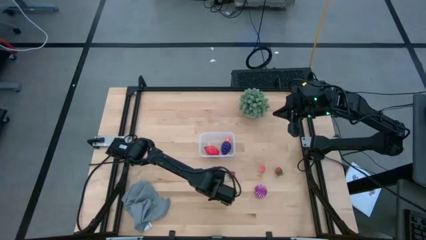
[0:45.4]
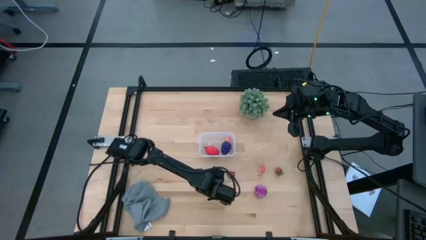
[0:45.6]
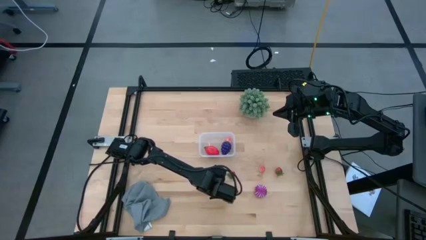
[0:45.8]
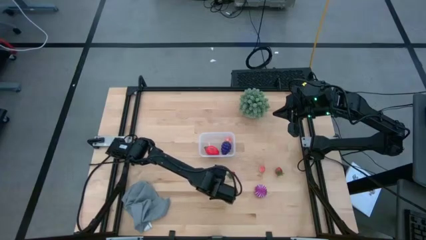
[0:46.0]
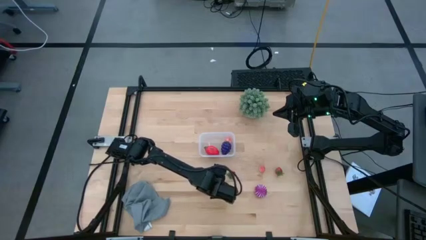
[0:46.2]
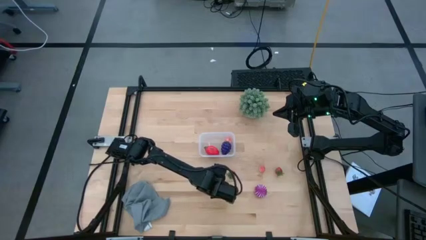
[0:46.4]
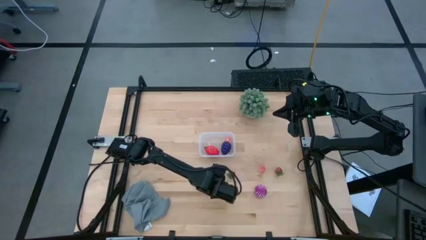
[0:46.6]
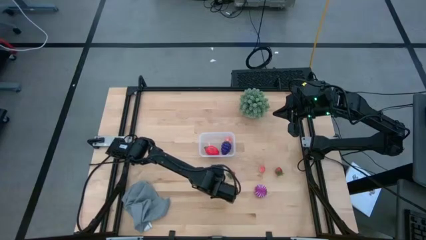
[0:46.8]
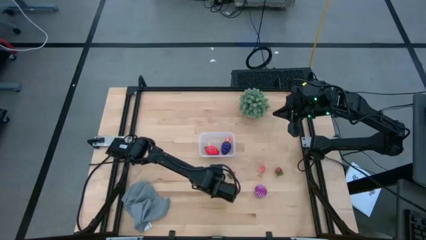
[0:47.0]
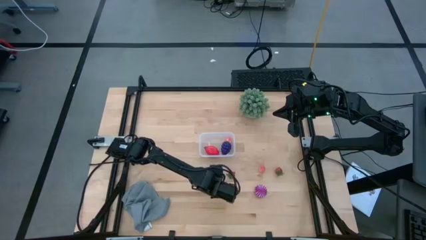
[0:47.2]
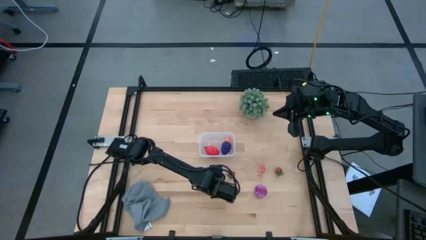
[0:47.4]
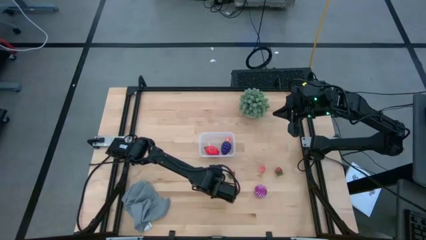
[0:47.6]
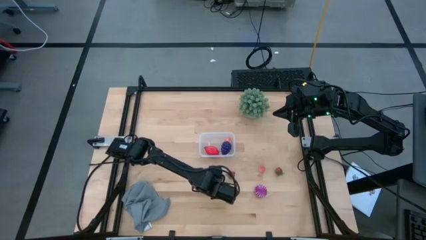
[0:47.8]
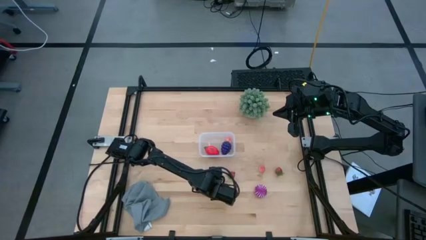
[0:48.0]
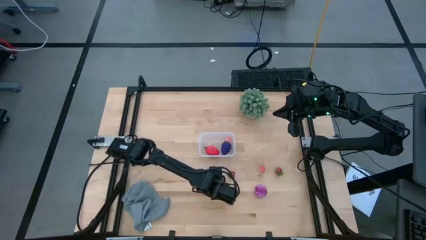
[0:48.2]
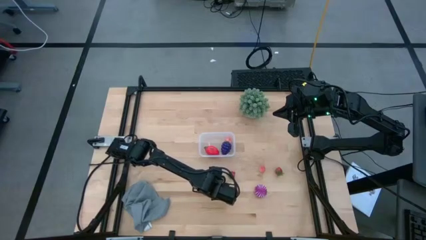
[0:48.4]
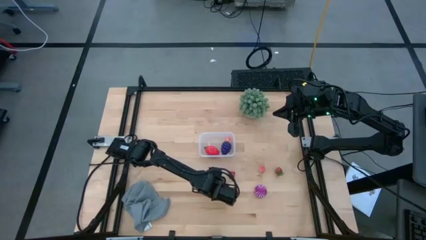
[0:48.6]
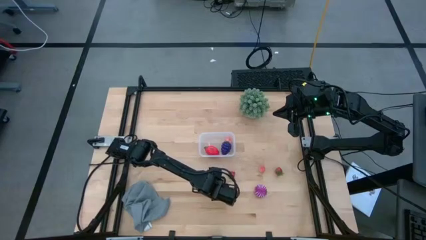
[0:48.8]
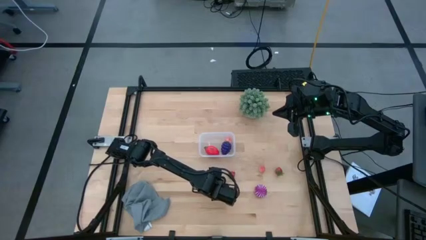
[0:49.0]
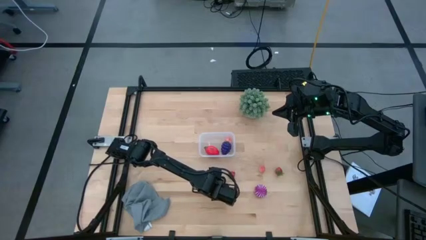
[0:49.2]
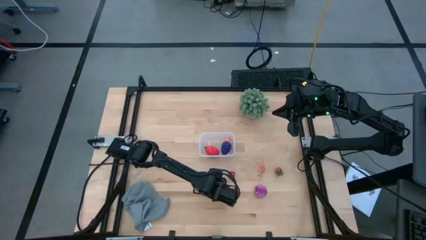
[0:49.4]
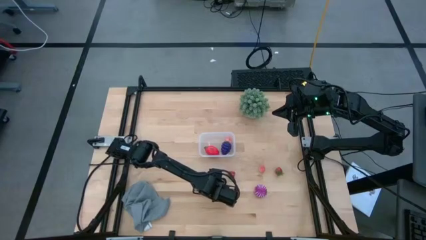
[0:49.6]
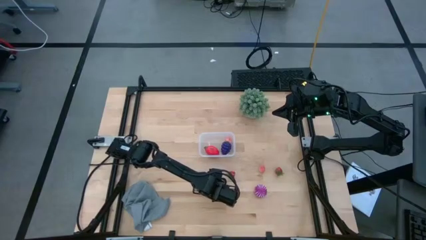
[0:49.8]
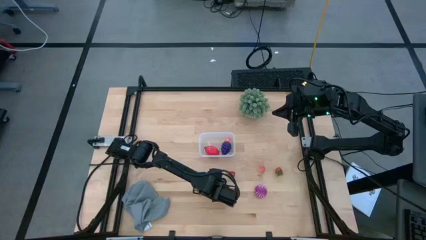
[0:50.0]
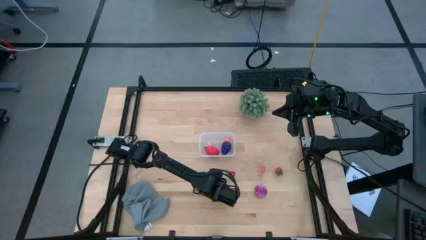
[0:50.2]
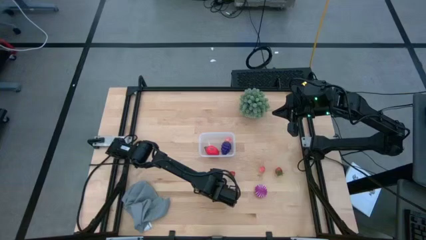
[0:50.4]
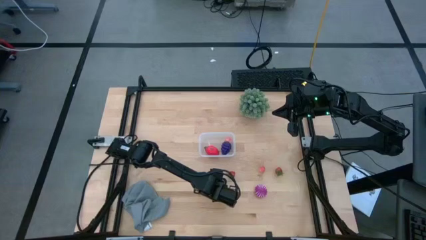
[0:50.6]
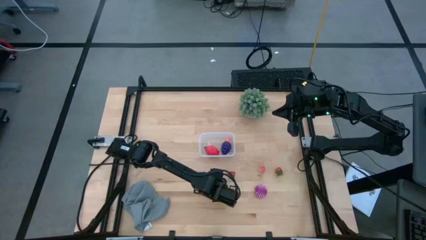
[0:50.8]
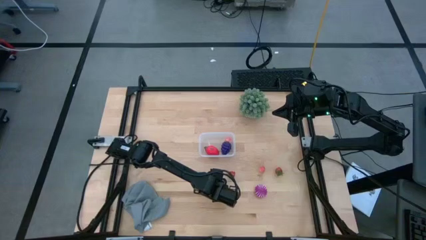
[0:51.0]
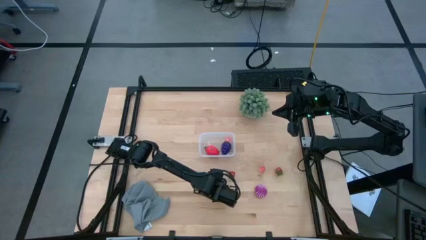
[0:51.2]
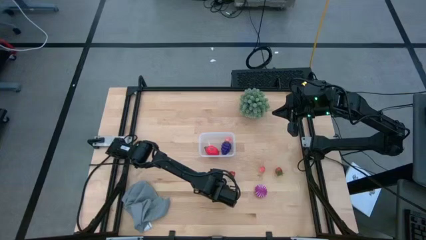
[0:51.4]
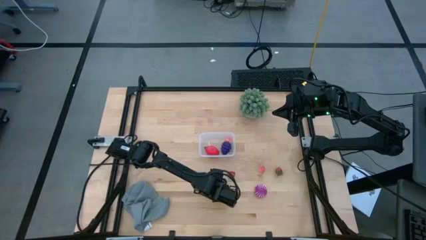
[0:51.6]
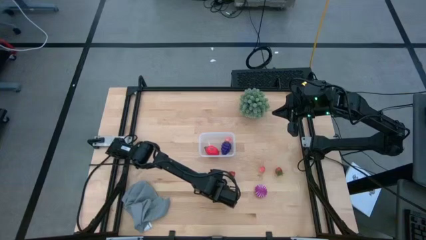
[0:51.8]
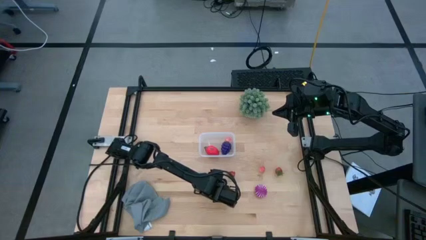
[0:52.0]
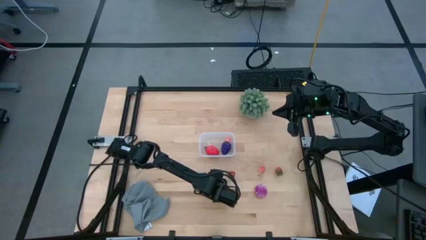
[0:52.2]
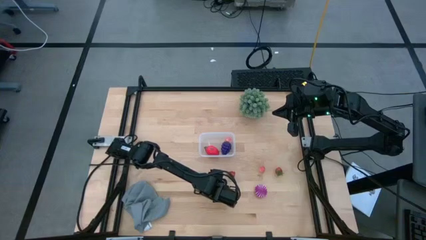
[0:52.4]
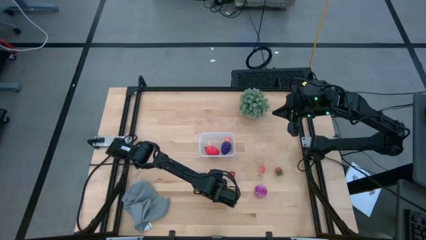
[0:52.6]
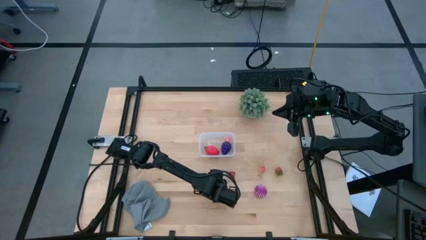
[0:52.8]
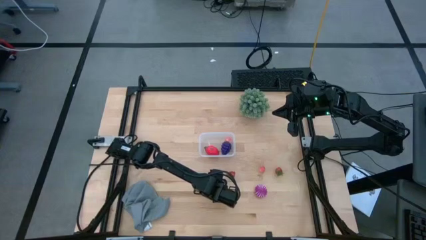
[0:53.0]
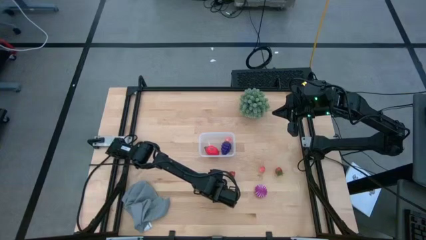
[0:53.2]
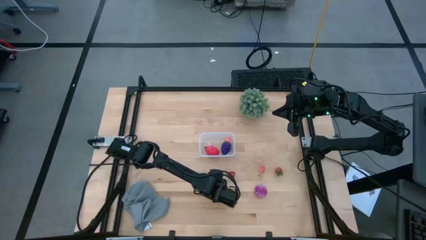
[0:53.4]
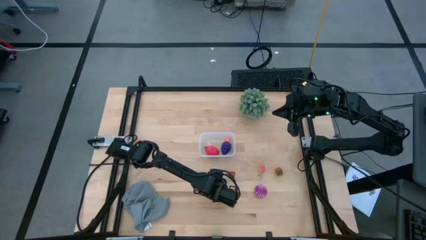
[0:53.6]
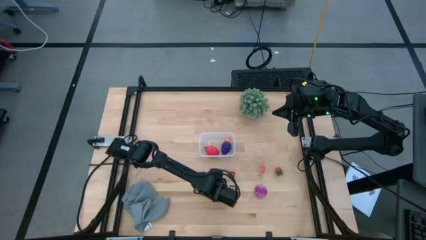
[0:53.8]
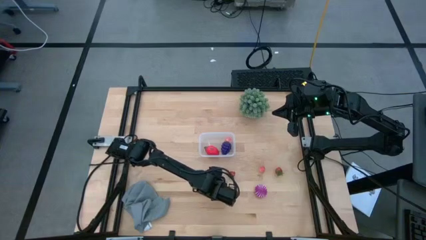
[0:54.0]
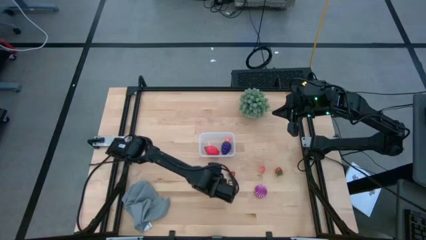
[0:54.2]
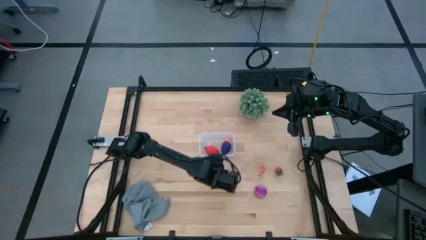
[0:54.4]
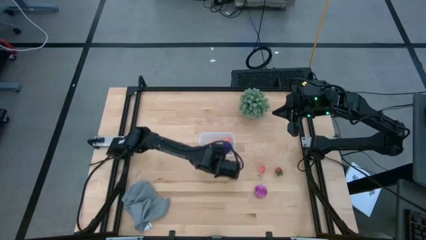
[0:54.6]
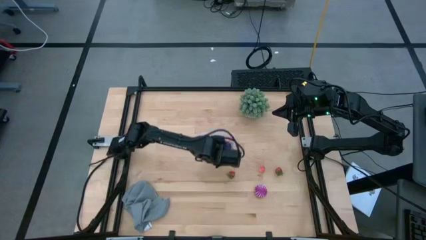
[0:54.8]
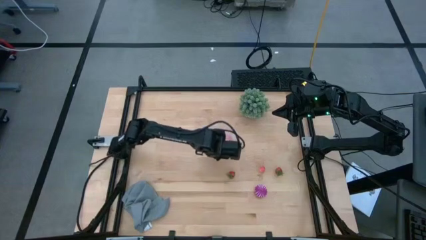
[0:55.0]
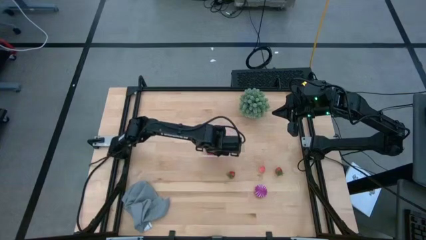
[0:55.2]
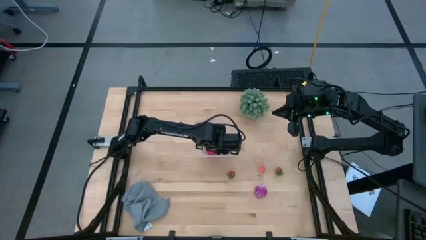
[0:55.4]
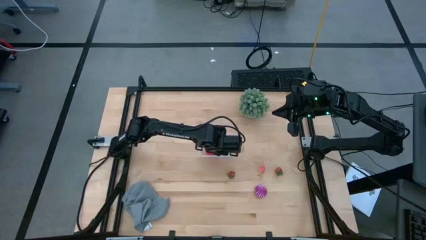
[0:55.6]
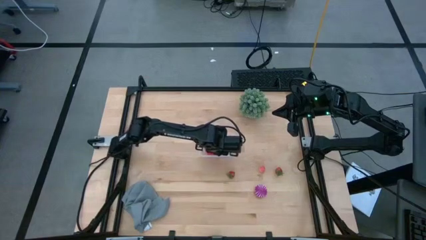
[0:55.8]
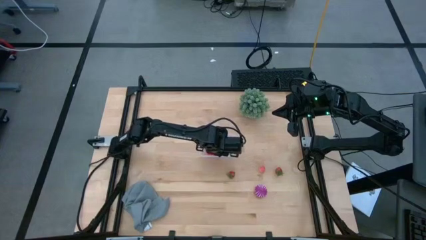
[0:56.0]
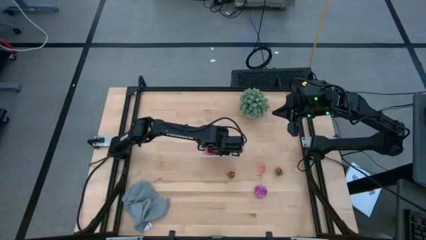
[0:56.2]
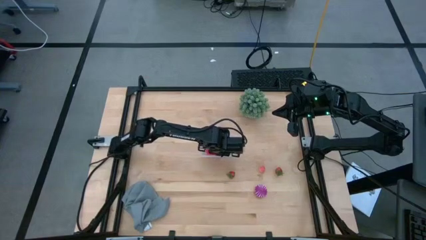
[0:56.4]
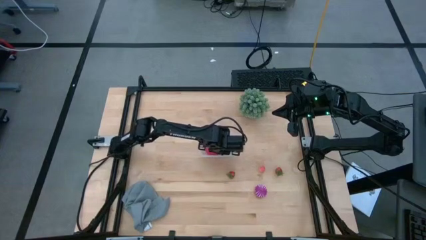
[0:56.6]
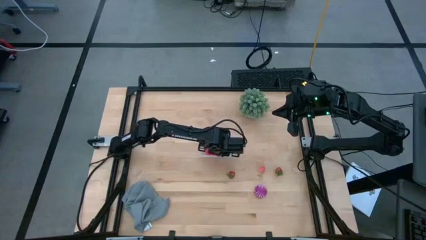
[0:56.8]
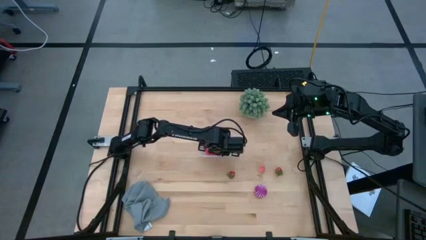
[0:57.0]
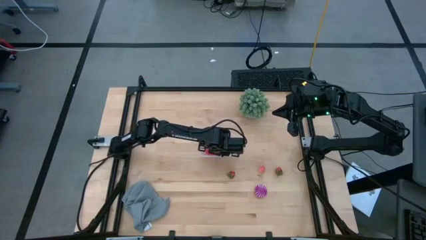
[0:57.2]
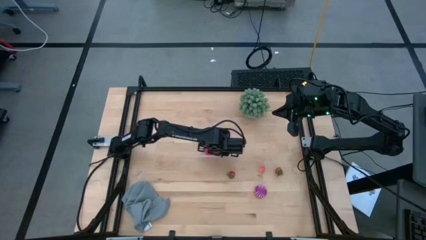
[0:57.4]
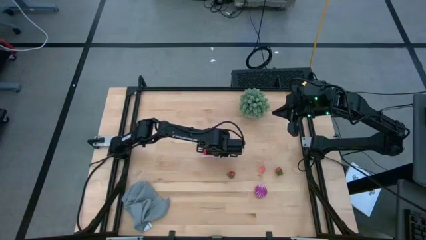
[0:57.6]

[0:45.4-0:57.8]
Task: Pick and placing Produce into tupperware
Put the left red strawberry into the transparent bin

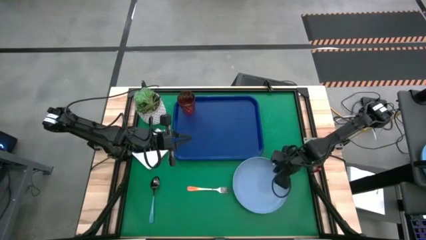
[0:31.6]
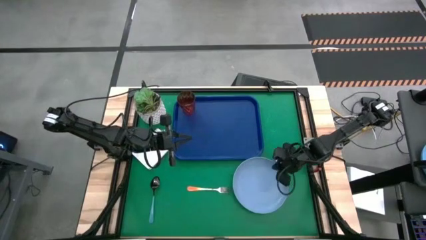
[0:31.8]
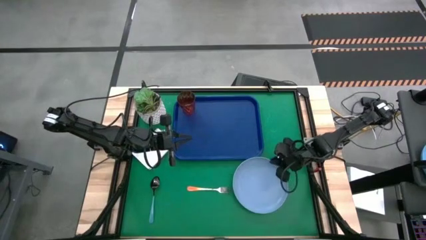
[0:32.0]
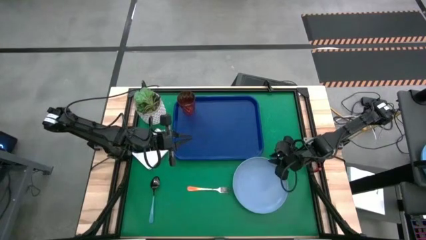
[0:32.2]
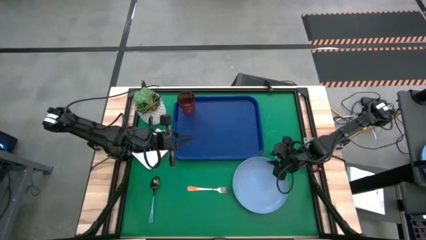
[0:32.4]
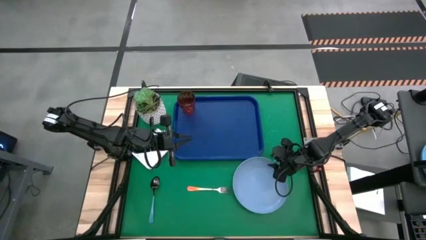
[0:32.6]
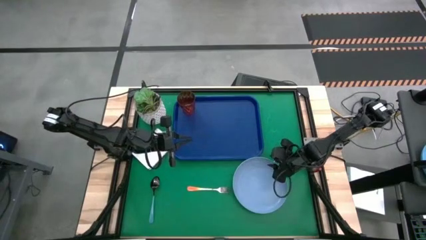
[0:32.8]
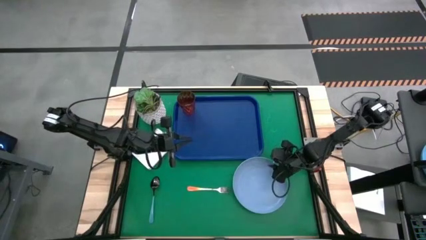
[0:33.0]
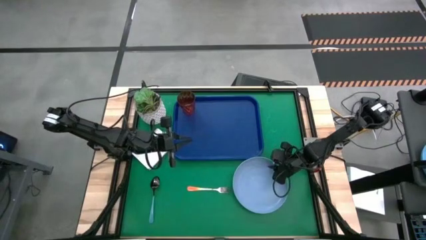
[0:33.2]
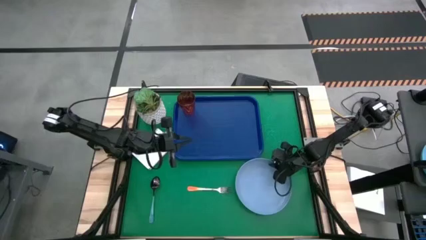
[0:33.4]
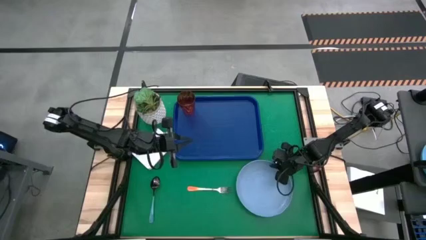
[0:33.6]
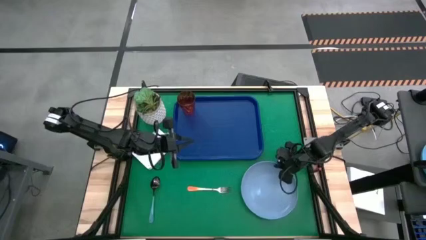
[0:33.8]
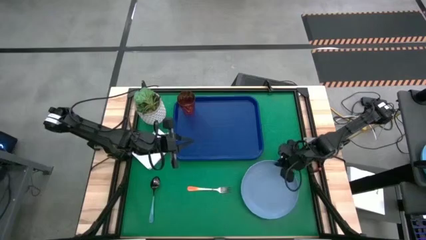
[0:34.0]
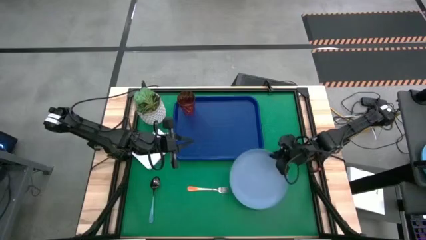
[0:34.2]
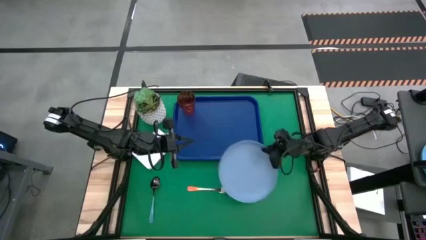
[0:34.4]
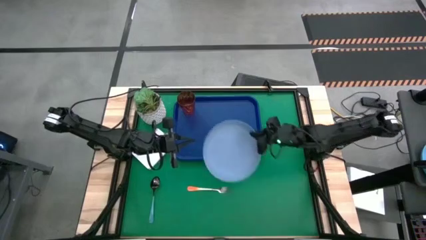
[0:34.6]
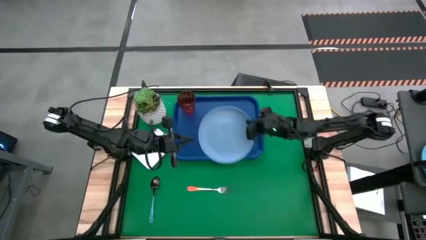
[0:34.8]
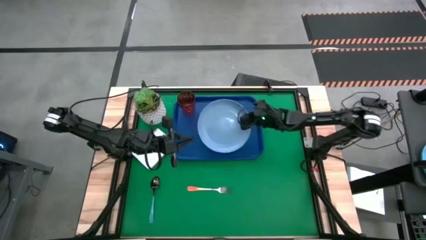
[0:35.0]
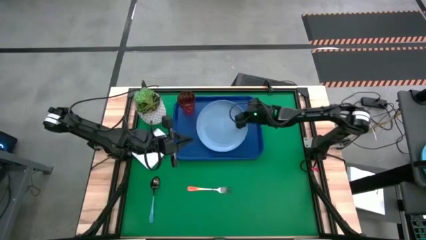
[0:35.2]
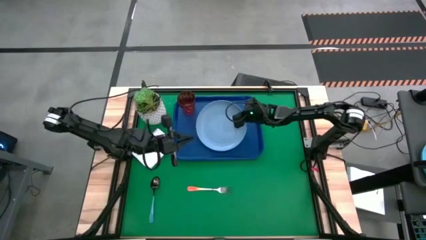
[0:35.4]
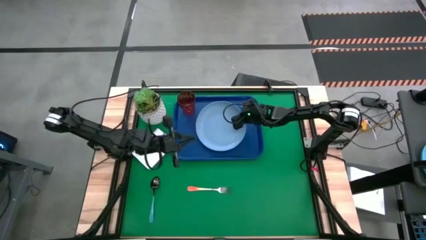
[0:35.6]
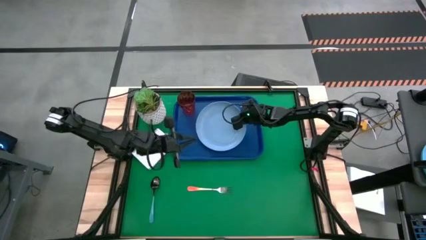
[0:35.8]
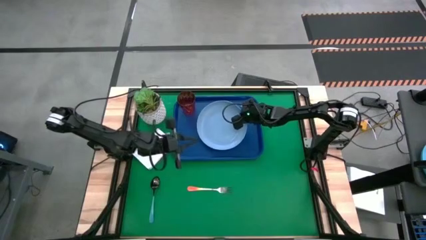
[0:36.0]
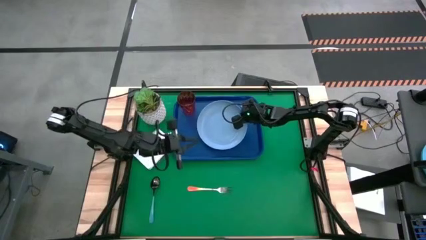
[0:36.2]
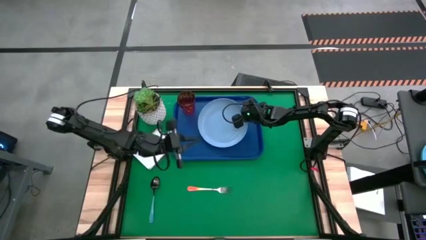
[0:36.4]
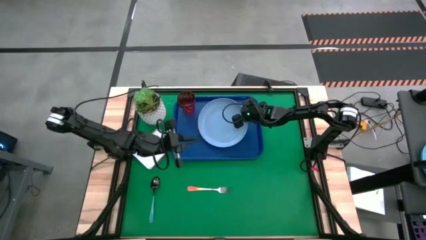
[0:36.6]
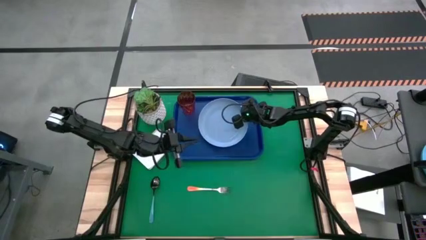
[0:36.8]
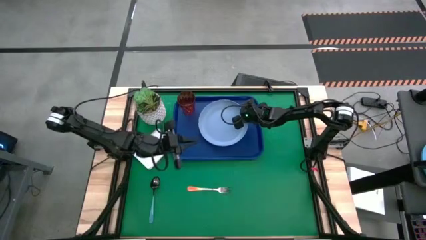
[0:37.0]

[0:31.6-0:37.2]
Task: Pick and place plate/cup/fork/spoon on tray
Put the light blue plate on the blue tray to the bottom right of the red cup
